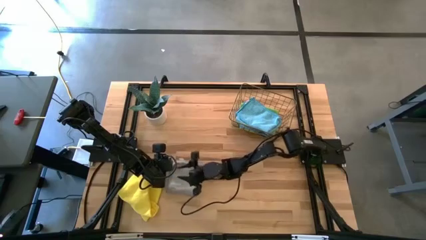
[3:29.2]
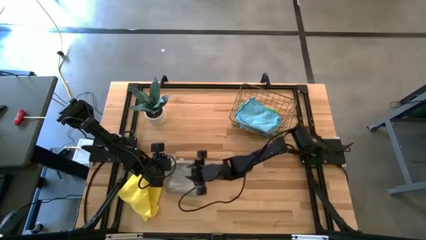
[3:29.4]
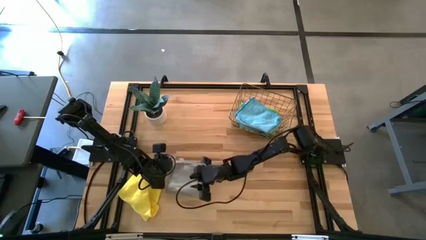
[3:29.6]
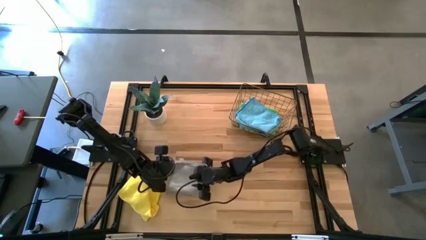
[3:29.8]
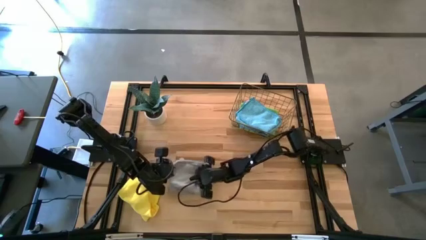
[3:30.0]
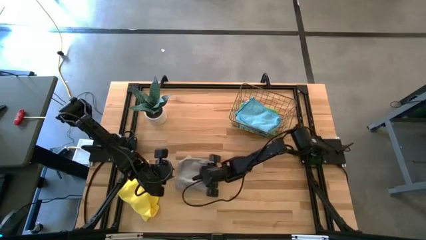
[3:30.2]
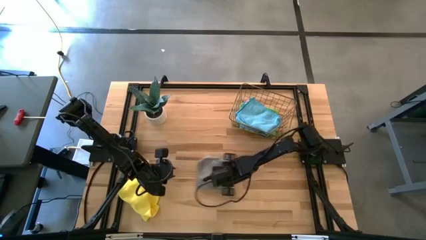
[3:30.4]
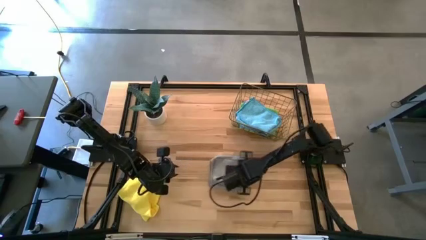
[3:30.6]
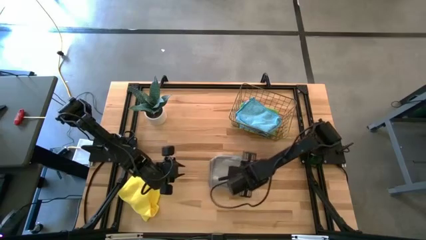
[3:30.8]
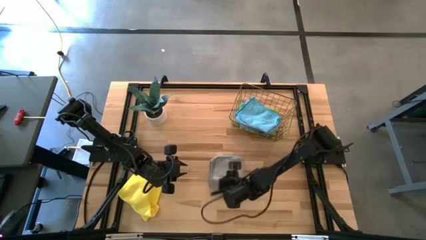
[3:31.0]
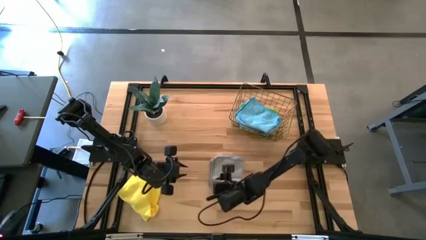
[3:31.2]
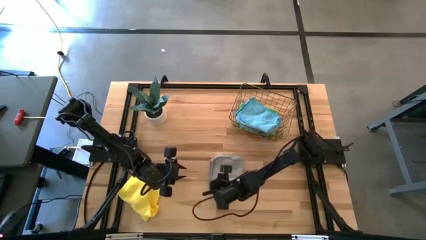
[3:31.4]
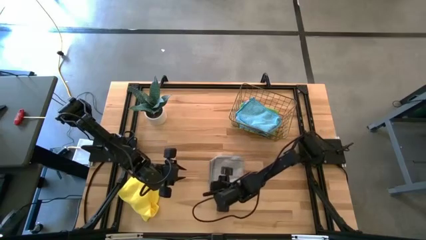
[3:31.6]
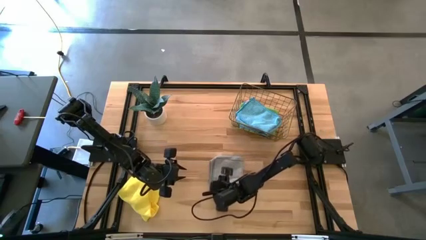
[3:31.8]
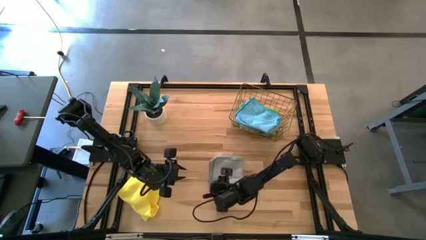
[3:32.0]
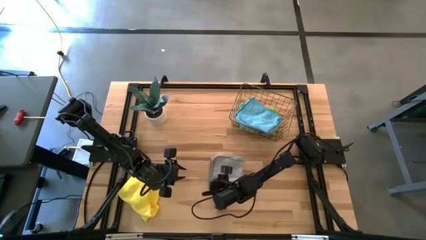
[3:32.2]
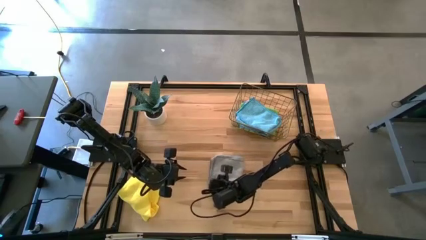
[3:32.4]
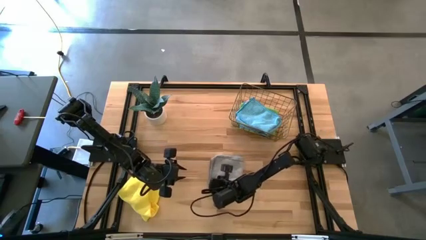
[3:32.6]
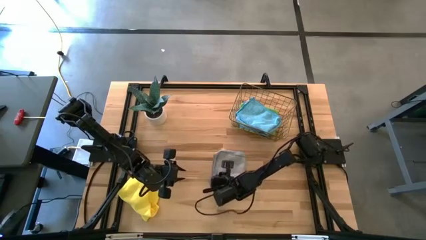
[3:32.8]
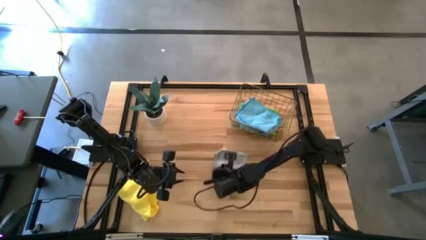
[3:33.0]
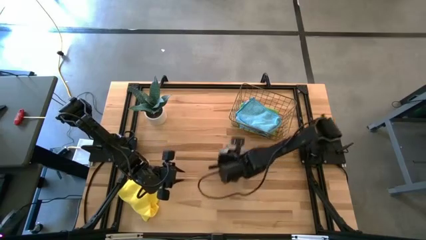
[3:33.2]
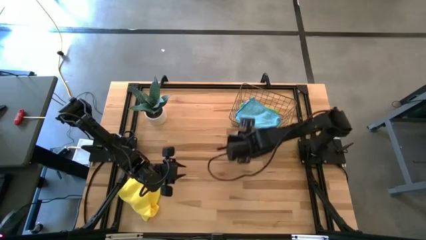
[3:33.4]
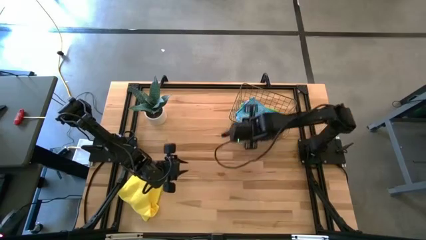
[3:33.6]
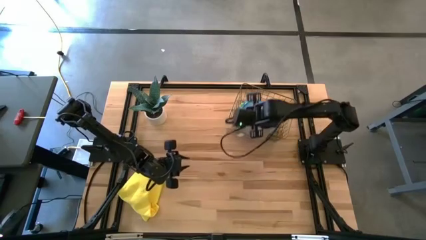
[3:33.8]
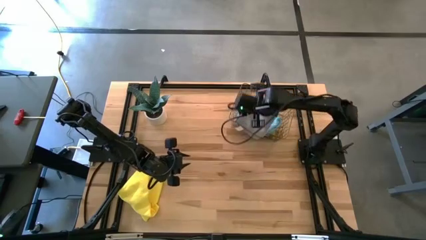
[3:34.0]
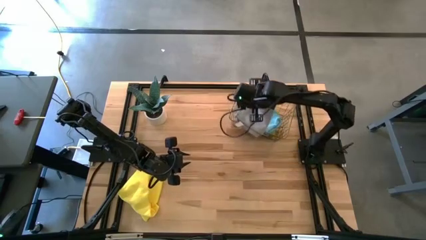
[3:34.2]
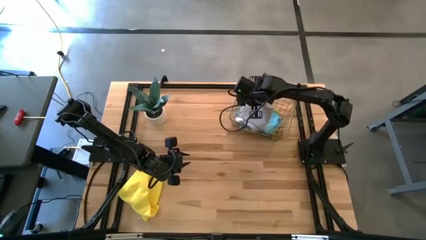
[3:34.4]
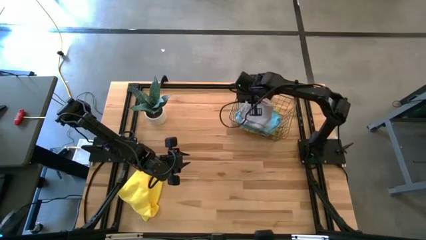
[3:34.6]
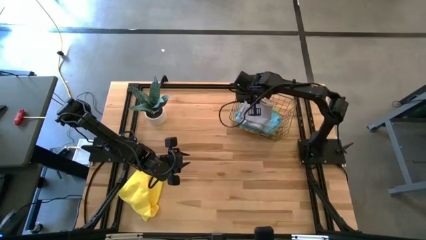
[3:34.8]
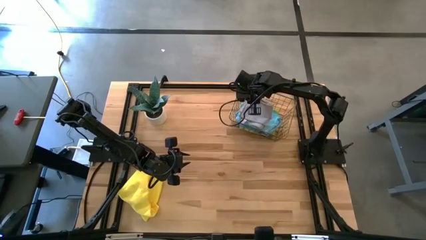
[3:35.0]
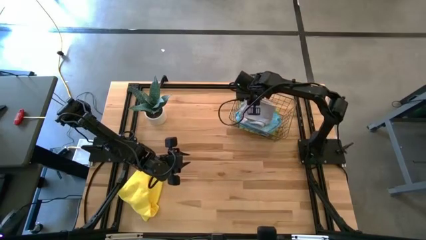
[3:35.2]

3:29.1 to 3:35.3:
Task: Fold microfiber towels
Put the folded gray microfiber towel into the wire basket

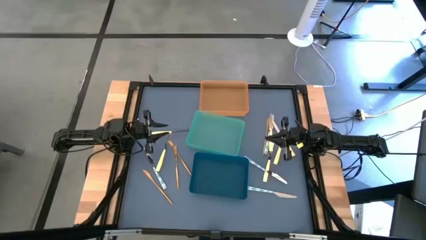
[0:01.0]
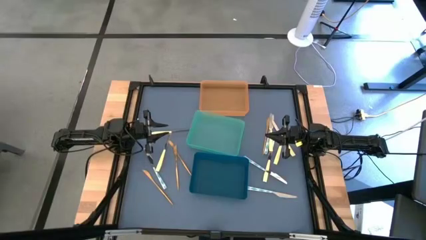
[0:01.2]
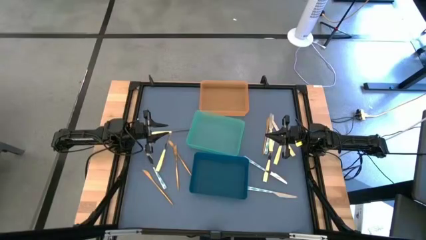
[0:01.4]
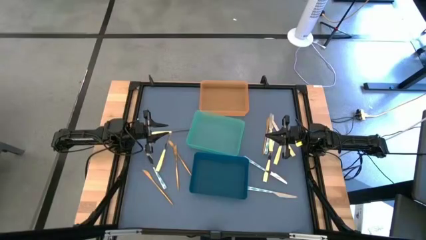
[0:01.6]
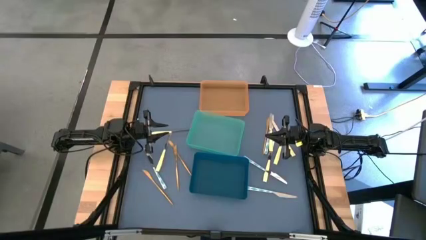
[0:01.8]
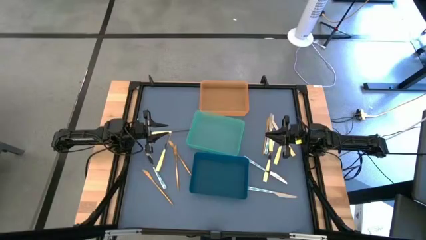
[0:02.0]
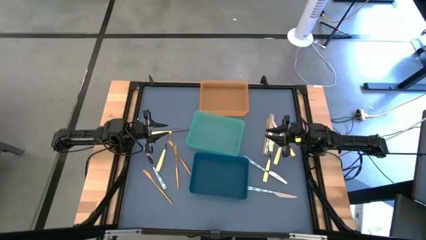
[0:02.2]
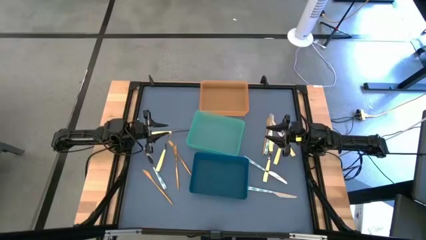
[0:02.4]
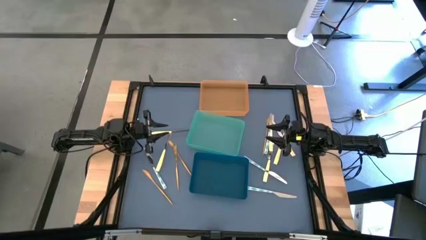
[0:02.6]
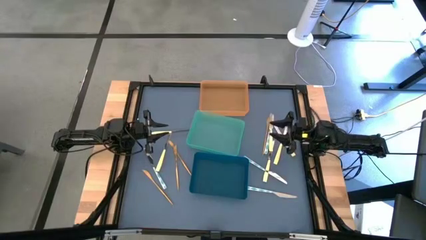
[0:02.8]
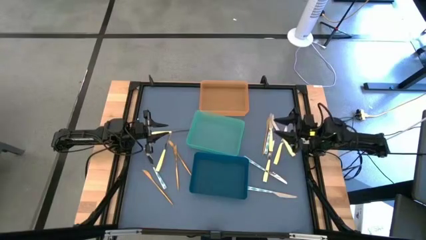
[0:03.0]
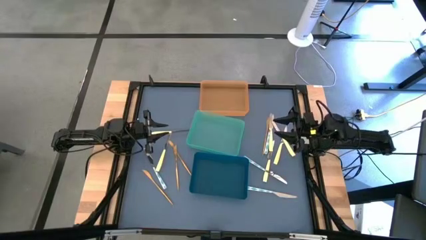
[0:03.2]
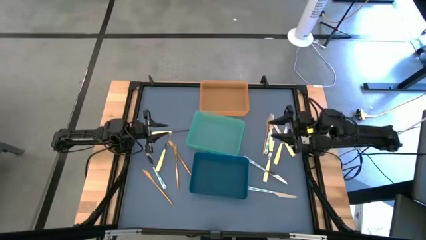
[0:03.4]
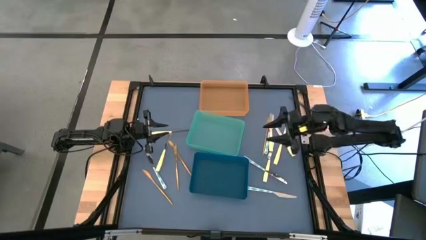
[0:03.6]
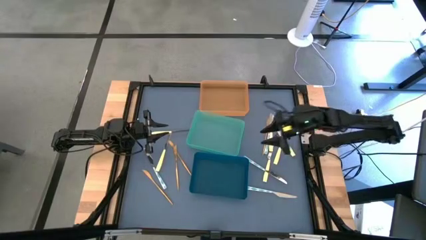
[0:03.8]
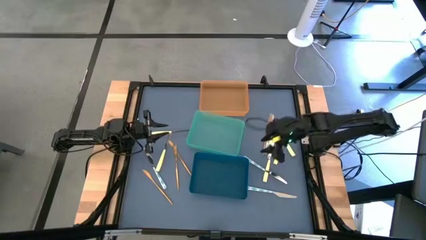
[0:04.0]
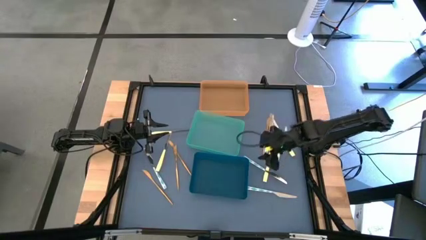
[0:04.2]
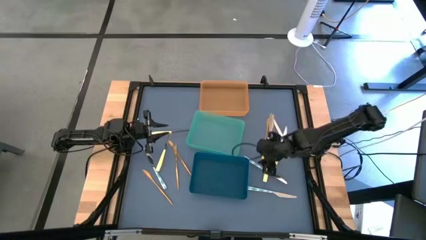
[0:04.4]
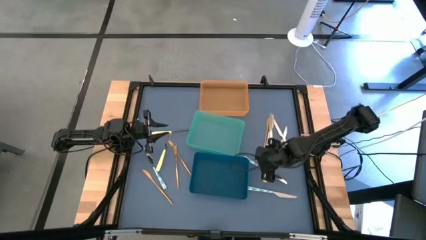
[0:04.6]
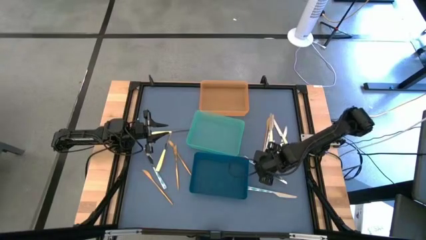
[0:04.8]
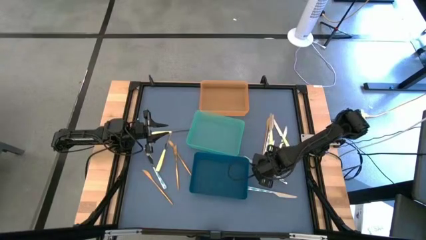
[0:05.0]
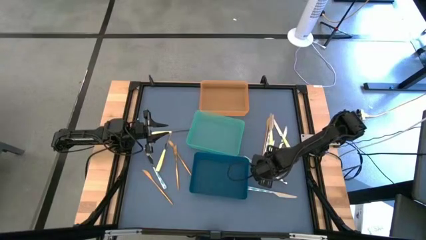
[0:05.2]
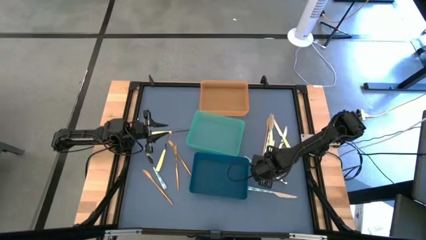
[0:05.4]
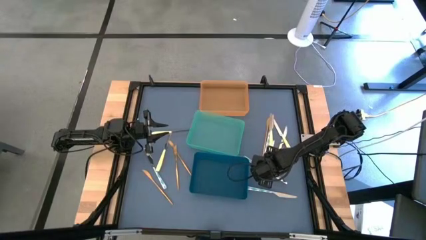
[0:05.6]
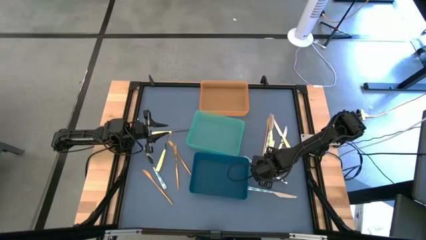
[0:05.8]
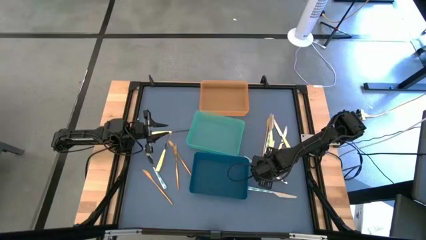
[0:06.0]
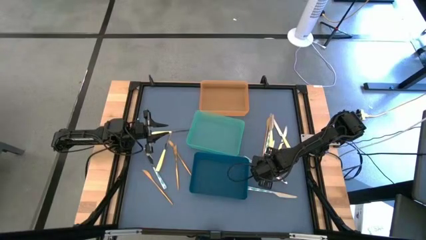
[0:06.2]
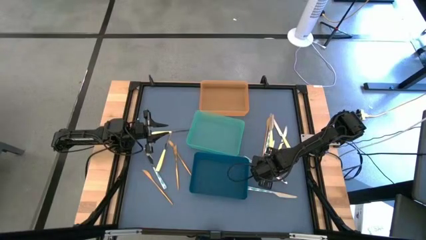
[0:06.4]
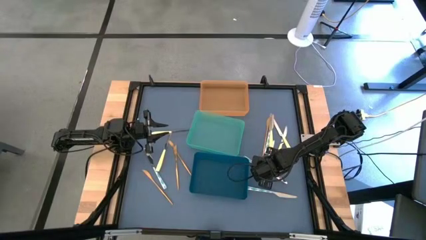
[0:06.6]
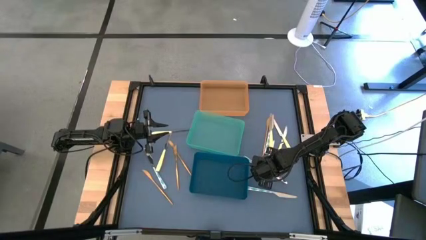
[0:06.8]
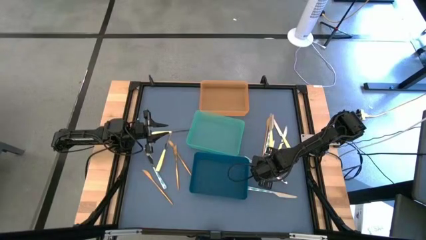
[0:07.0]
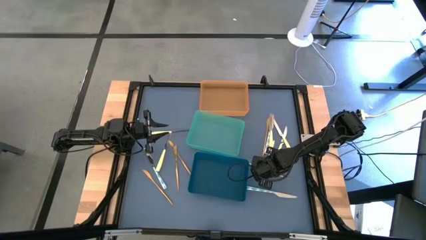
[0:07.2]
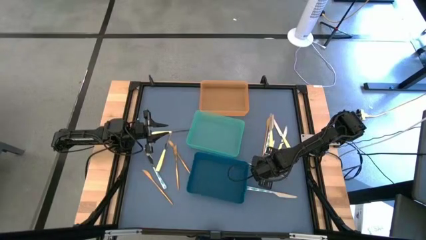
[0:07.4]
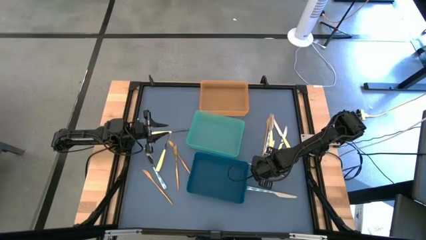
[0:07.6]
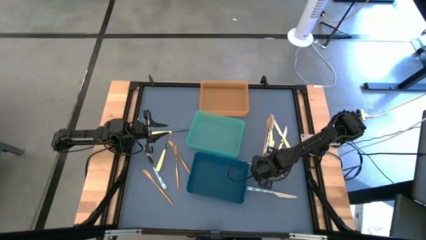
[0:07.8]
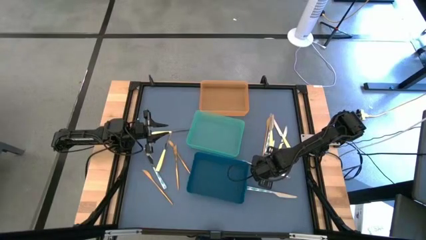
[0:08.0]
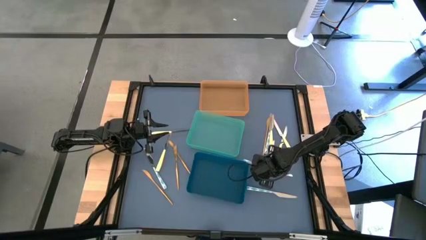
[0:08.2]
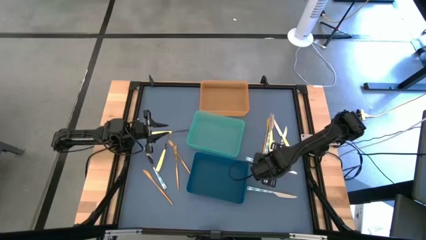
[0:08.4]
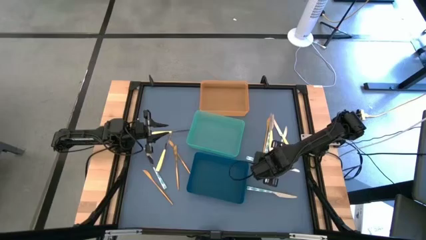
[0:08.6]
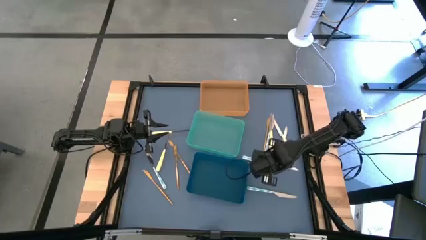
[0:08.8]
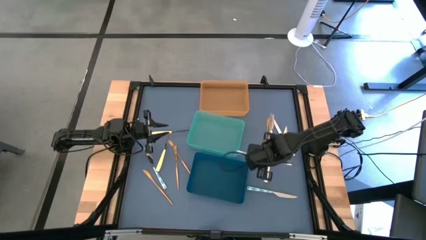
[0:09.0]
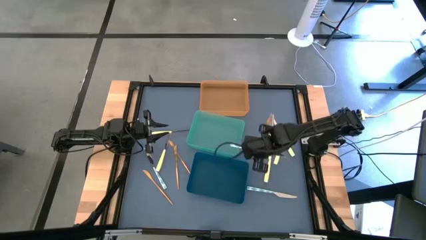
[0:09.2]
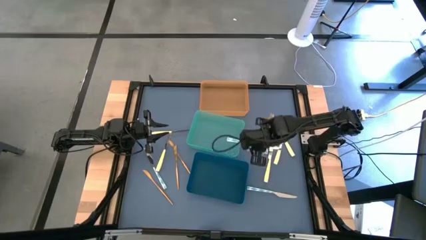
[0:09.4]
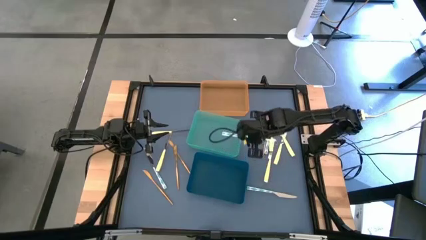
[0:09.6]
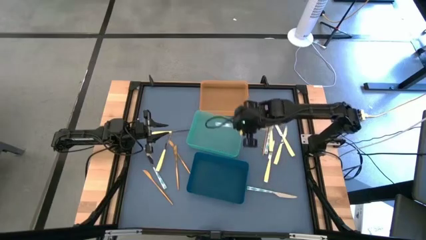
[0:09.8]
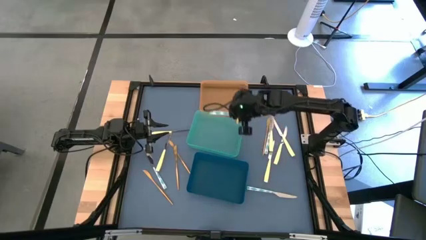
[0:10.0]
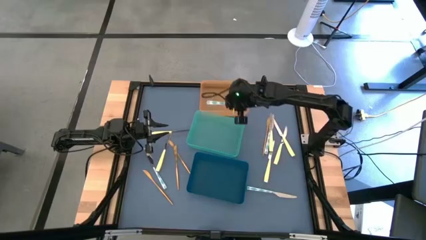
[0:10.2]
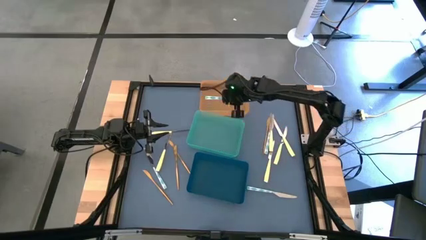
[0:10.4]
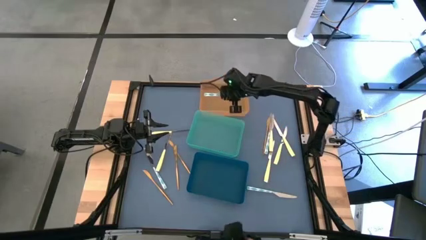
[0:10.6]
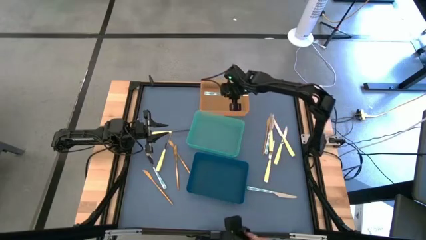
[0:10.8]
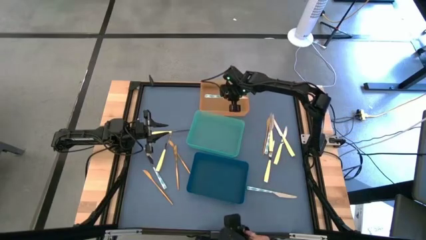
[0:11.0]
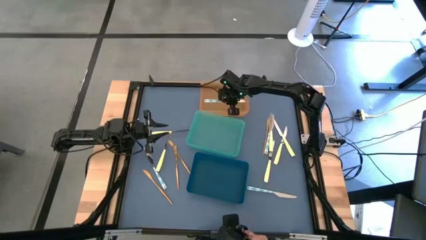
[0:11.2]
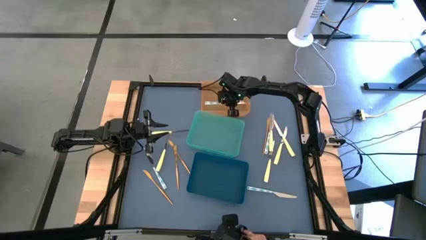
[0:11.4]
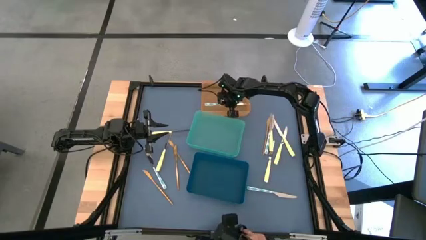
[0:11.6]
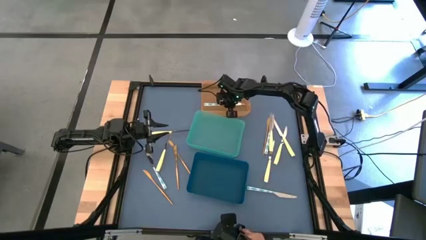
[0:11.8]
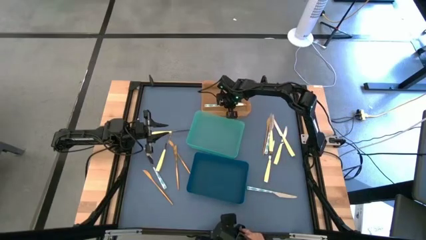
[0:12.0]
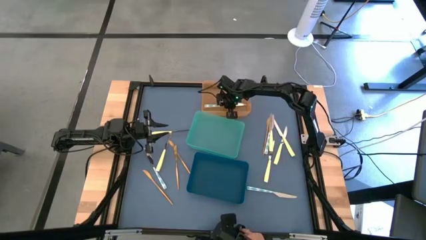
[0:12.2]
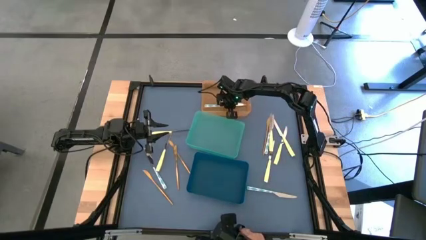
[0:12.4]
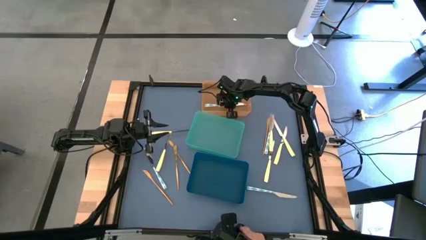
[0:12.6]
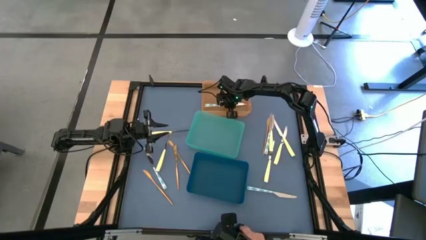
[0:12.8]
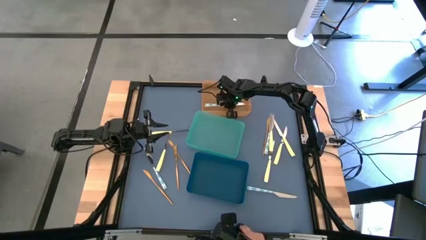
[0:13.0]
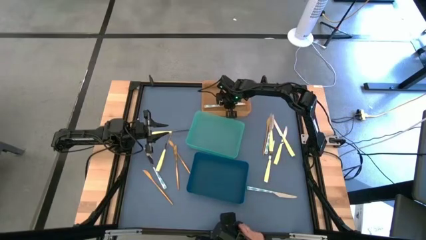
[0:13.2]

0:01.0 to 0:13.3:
Task: Sort silverware by color (type)
Put the white and blue knife into the orange bin
